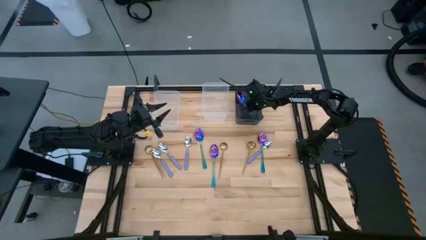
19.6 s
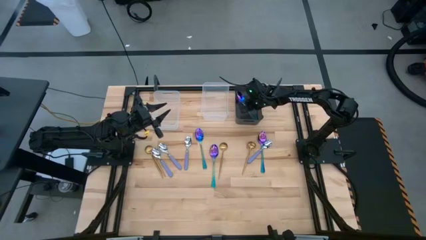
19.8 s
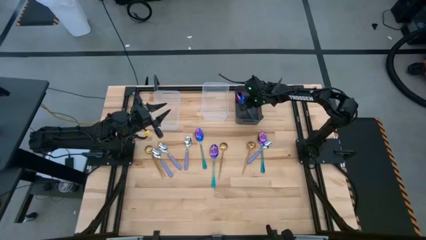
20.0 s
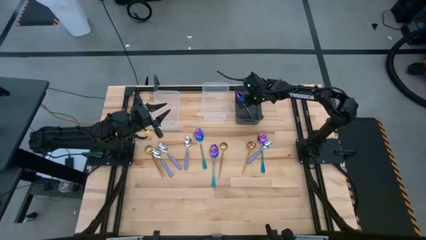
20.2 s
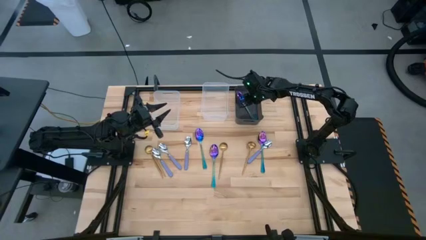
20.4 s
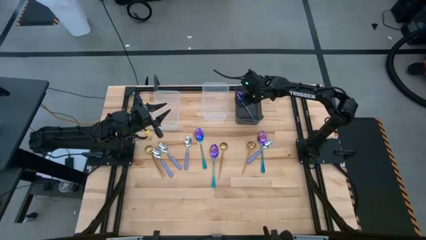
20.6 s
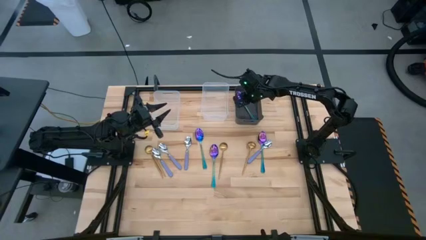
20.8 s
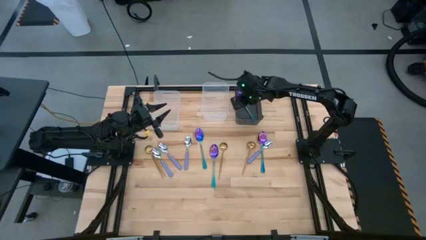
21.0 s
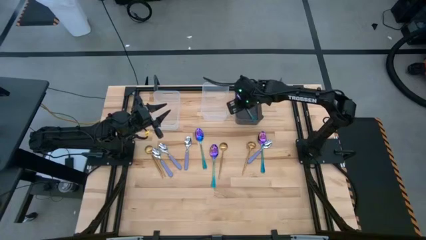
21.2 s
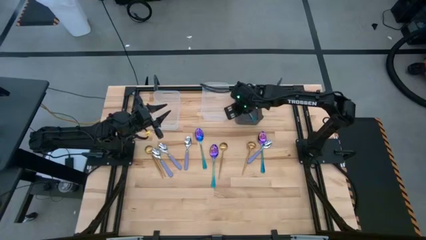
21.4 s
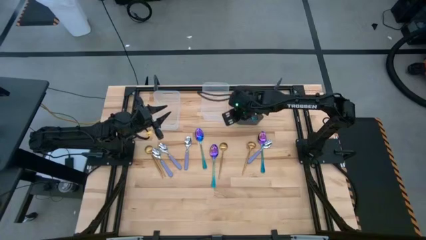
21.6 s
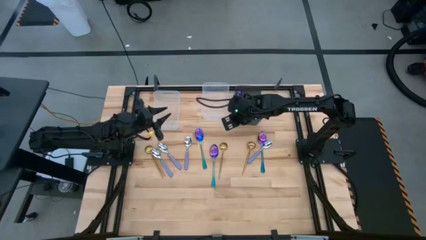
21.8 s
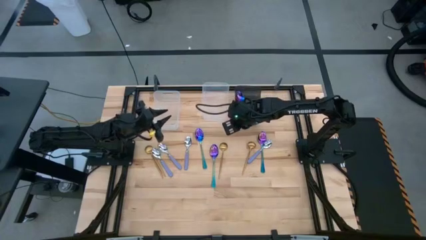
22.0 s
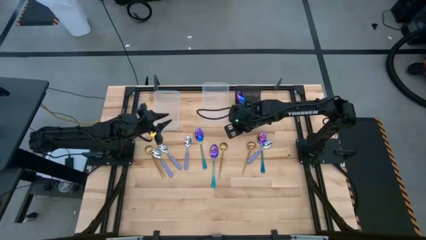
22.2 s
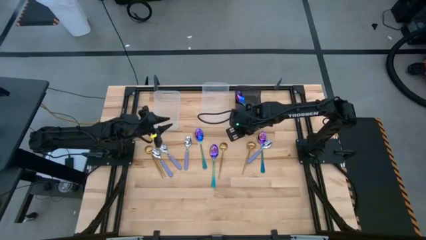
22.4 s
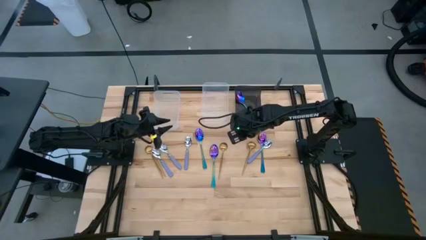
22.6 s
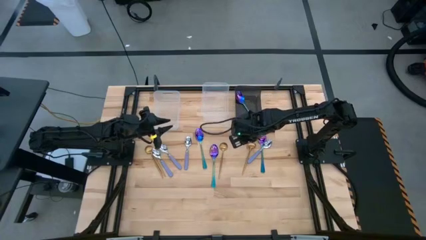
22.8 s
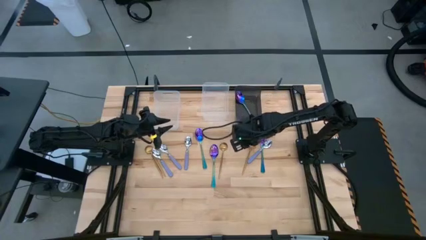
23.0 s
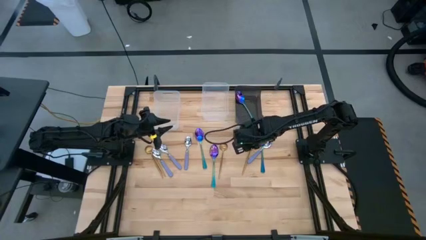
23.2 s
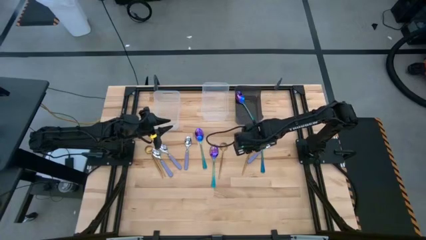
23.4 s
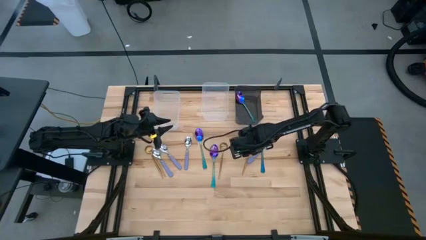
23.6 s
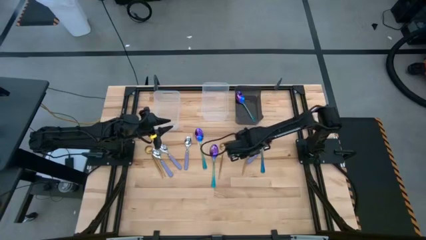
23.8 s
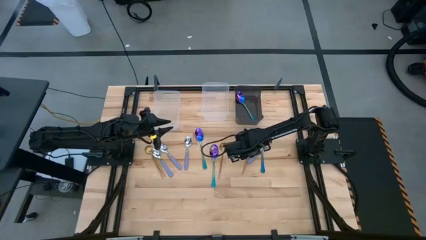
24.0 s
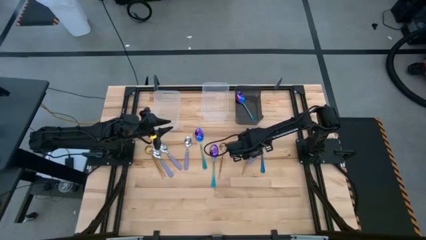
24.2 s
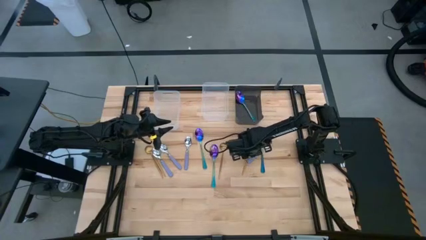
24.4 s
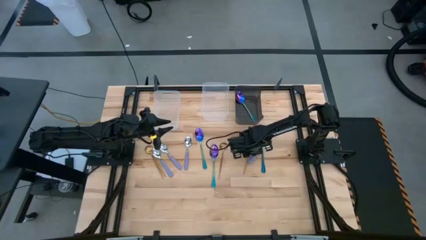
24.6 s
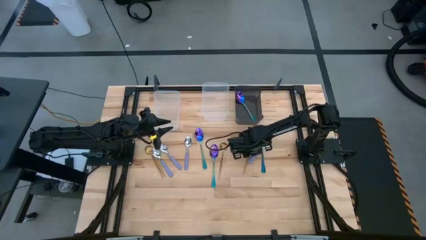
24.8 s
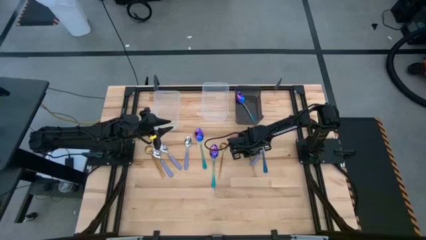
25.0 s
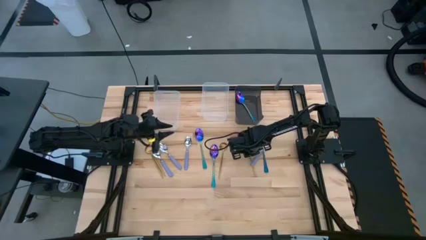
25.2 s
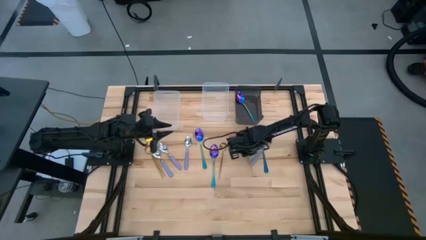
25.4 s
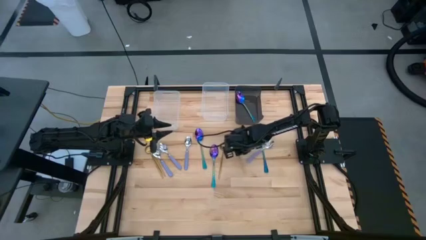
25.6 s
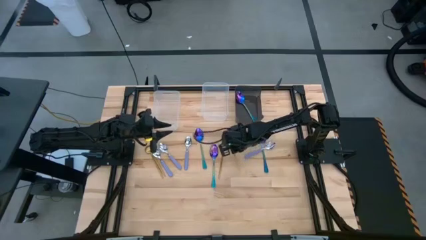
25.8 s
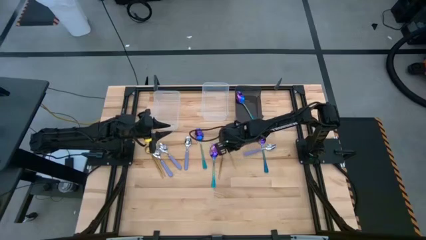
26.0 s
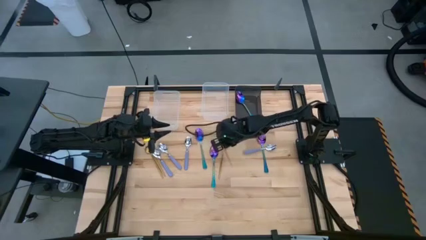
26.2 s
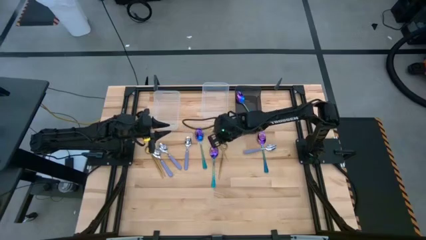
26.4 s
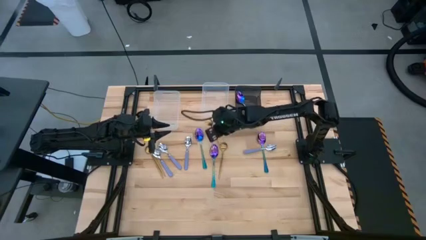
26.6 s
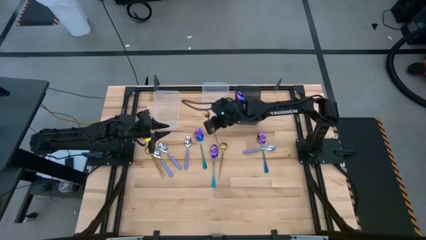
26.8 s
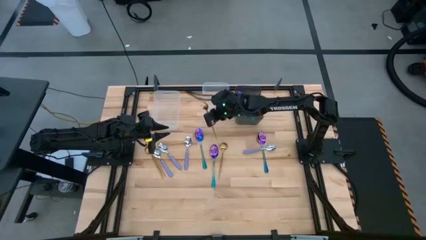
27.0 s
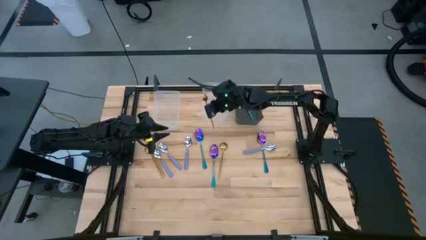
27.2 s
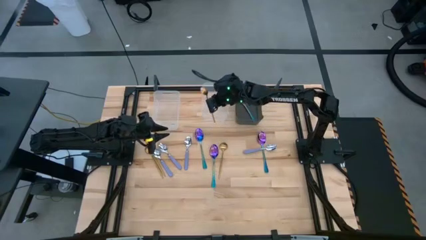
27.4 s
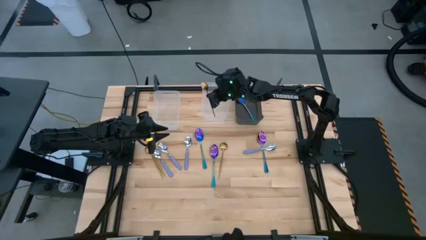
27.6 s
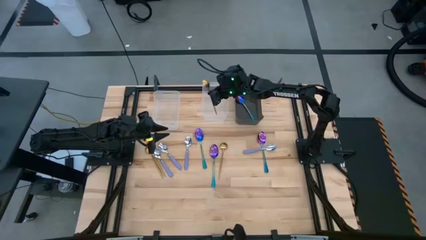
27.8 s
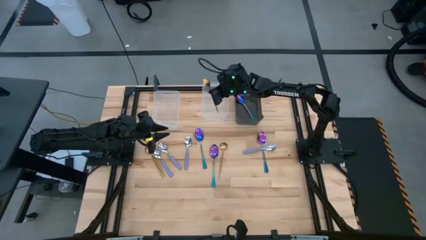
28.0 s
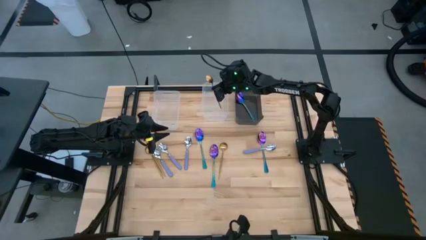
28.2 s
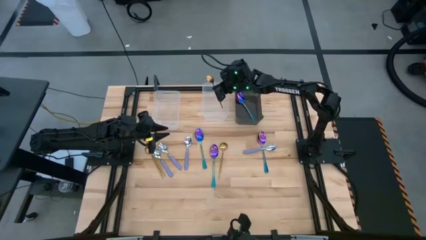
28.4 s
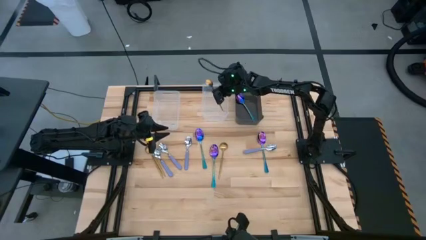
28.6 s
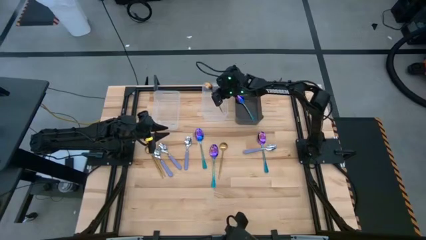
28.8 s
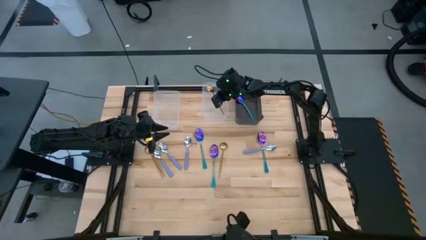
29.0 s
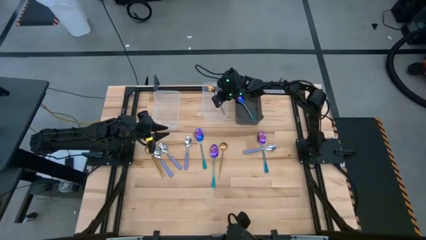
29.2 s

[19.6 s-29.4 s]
Task: Sort silverware by color (type)
Put the gold spoon into the right transparent bin
